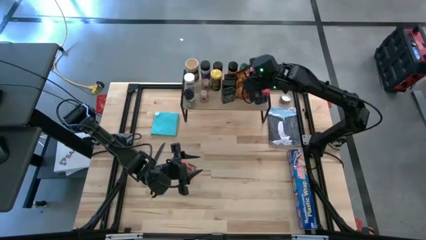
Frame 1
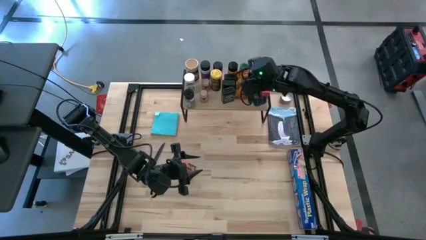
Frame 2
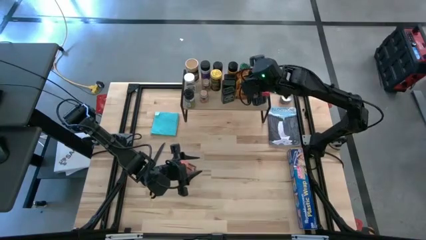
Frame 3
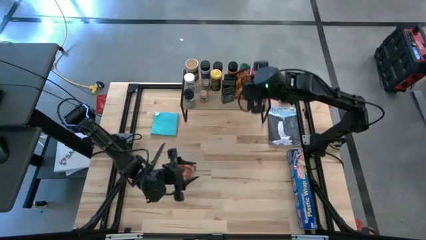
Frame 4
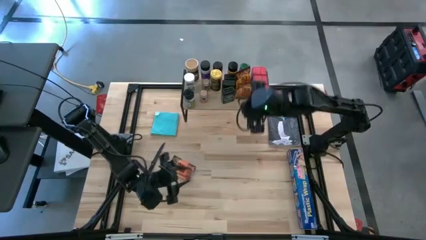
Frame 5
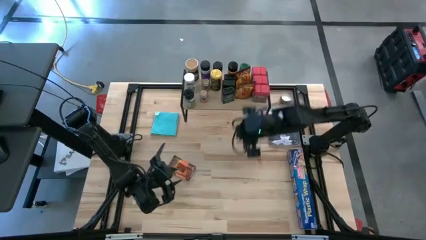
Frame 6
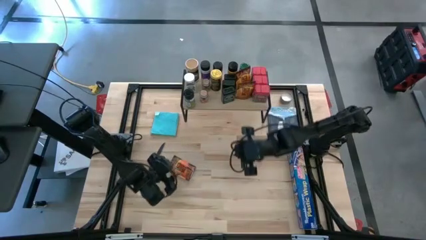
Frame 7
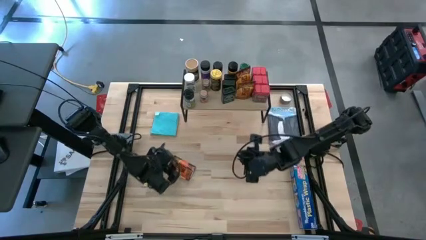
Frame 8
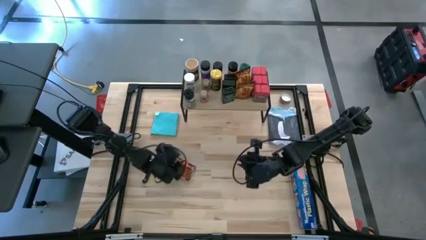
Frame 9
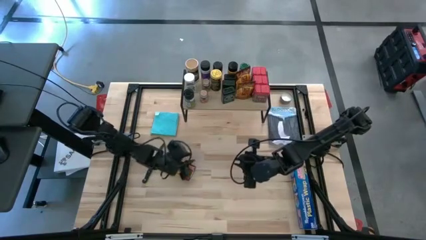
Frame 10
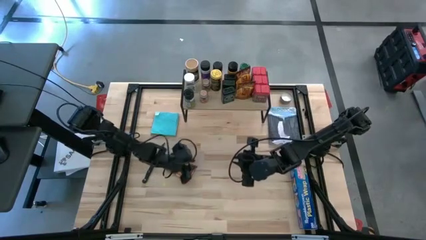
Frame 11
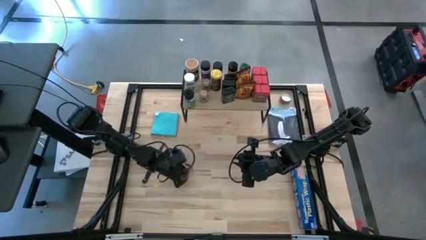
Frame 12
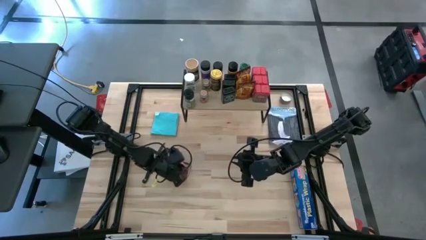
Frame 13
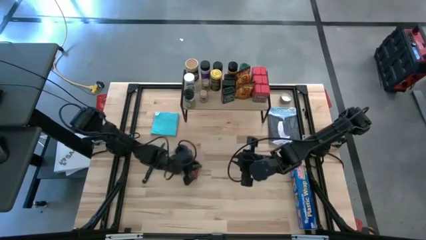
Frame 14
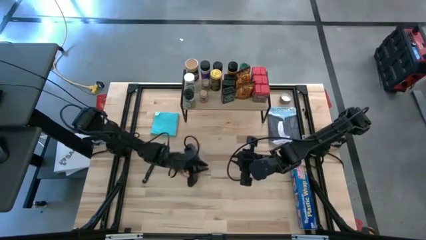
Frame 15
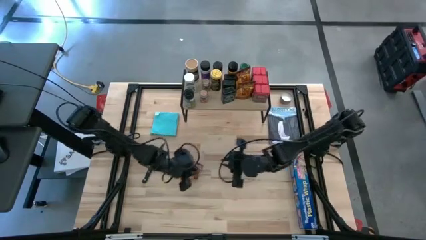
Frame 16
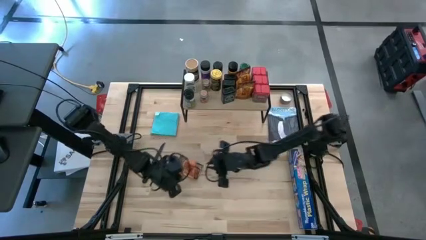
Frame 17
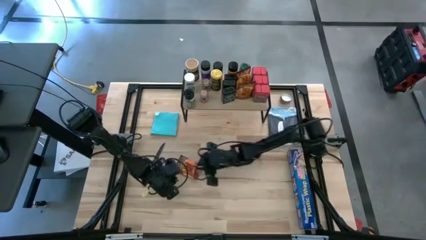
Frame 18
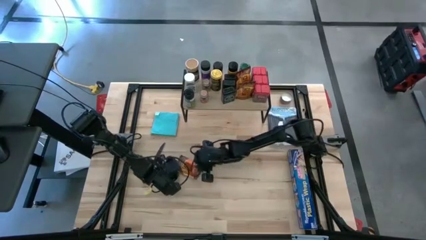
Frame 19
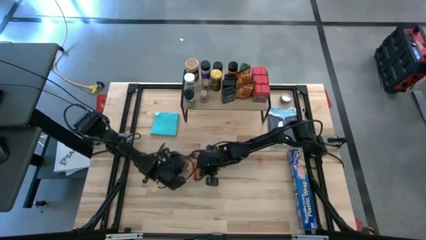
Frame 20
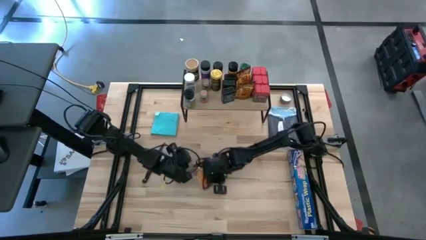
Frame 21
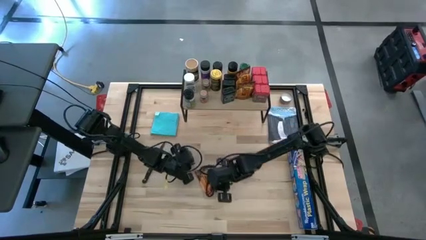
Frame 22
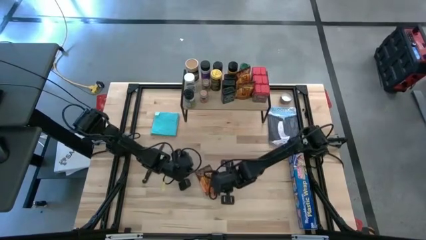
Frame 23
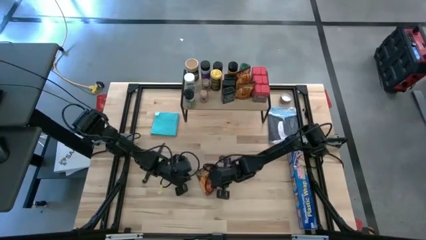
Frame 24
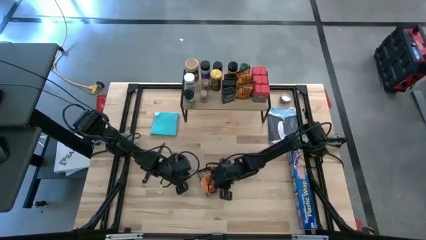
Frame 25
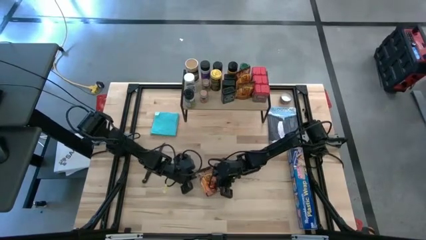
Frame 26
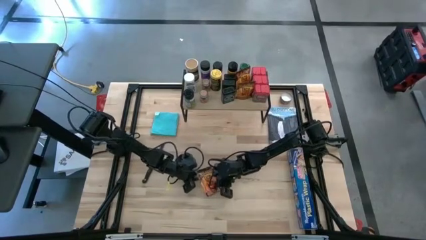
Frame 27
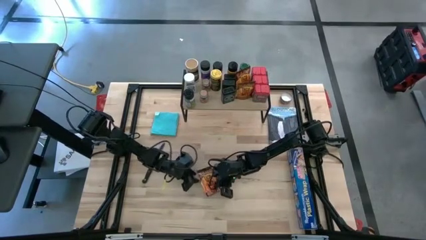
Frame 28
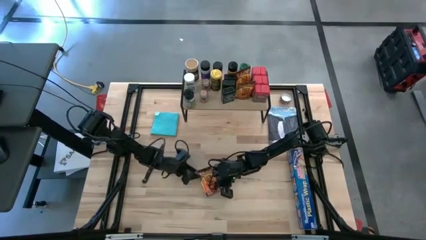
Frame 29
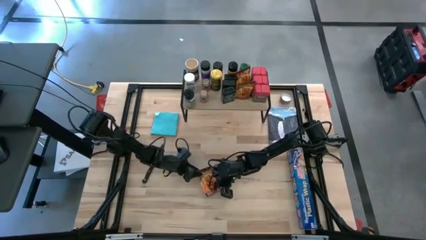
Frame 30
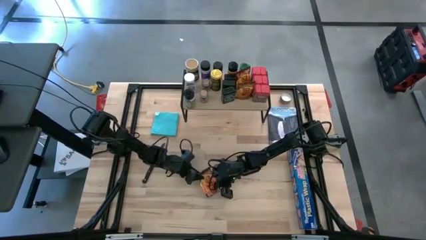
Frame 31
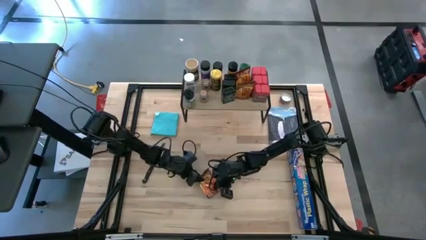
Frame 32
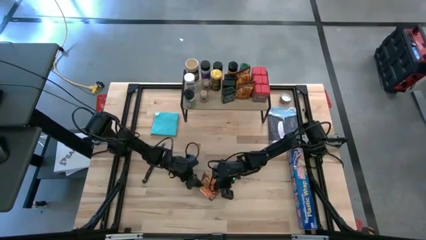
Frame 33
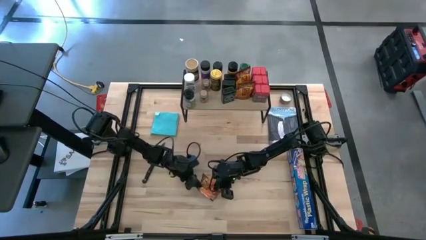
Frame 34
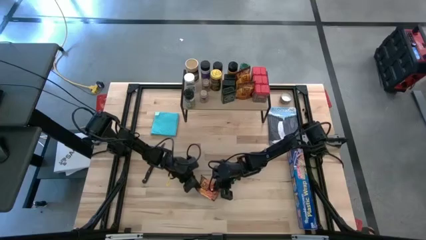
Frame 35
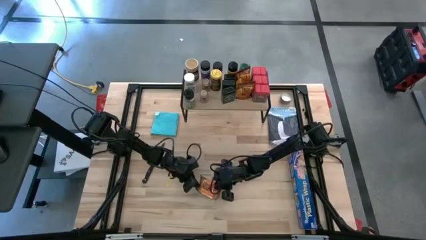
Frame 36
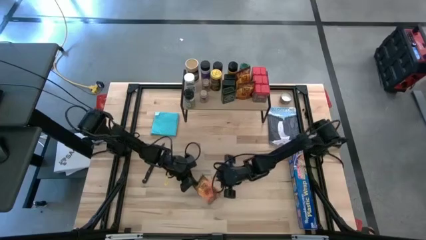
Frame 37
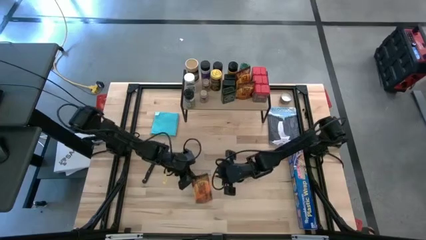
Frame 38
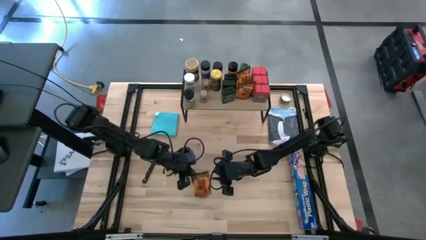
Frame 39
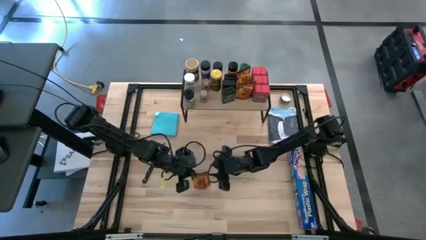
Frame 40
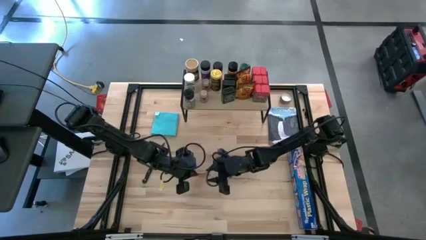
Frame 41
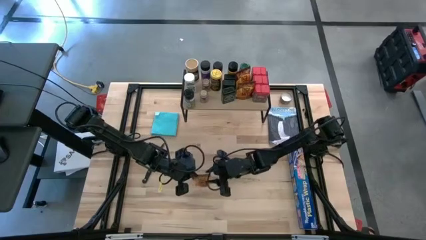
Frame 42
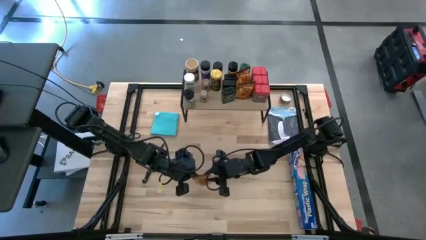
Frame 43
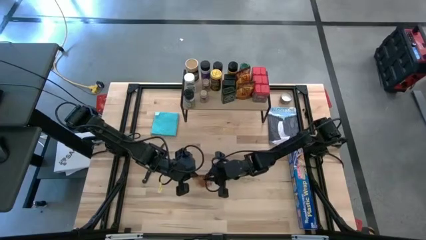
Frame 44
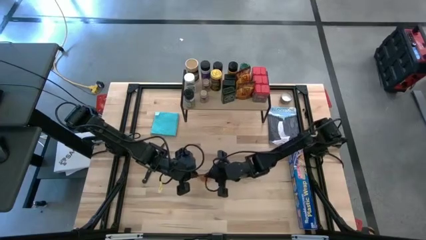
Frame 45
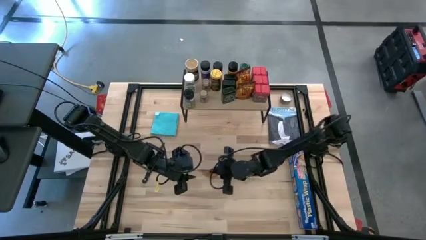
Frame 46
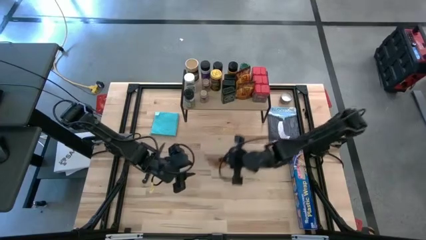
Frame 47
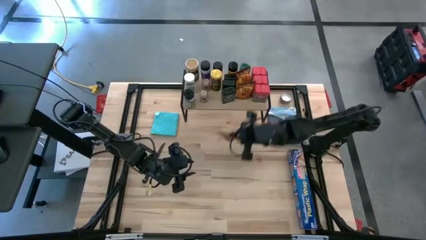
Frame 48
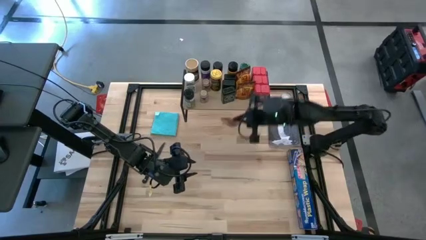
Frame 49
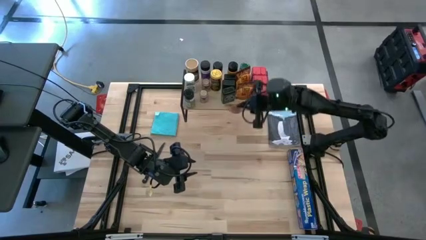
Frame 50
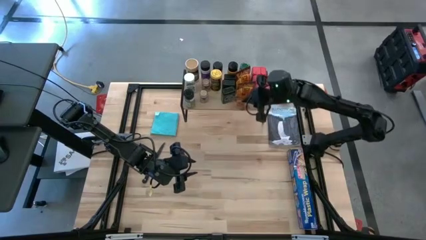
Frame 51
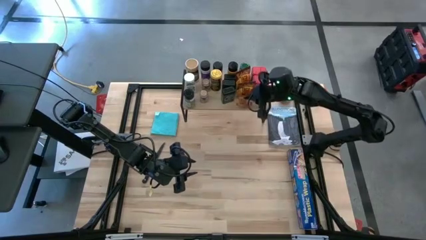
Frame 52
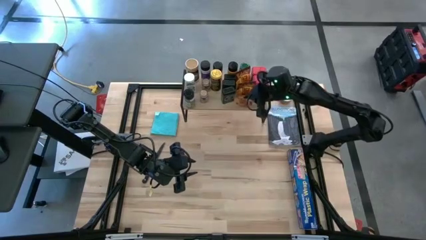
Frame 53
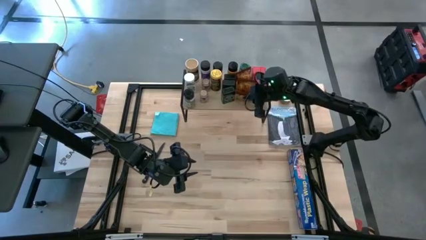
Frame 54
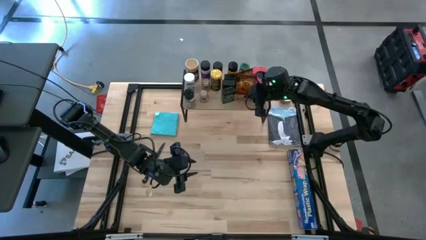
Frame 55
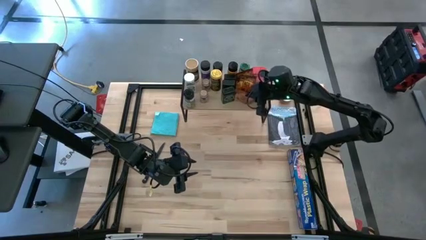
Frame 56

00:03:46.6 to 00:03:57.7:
Task: Shelf spices
Put the orange seasoning bag on the shelf aligned with the other orange seasoning bags

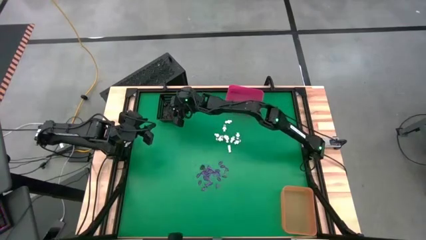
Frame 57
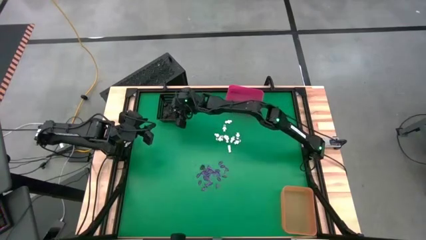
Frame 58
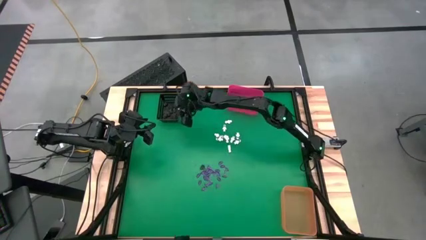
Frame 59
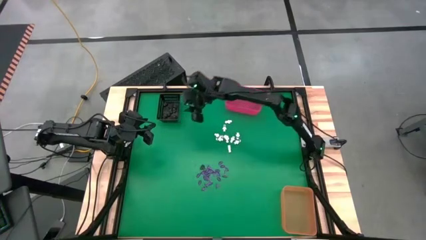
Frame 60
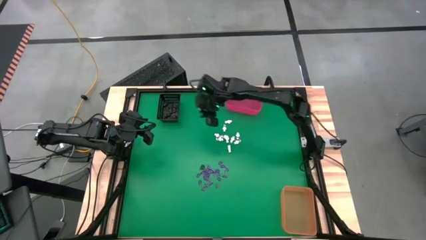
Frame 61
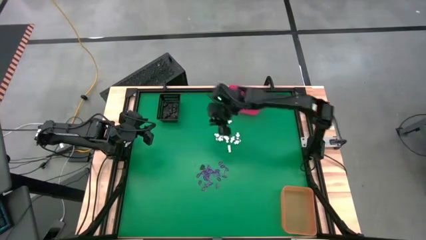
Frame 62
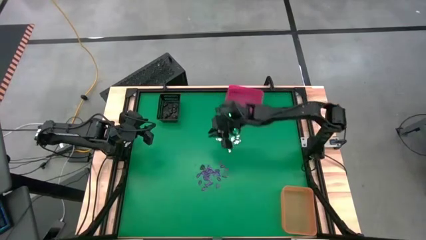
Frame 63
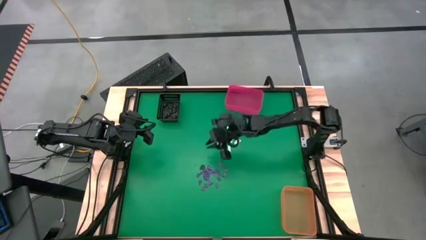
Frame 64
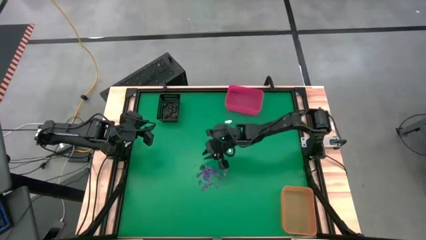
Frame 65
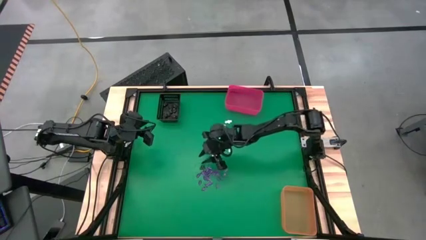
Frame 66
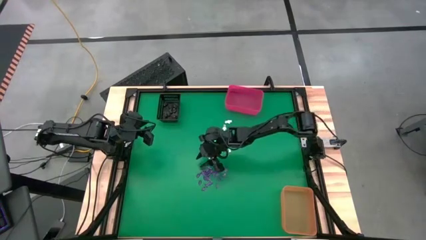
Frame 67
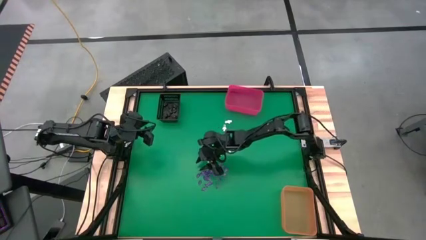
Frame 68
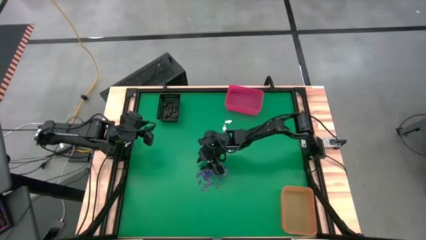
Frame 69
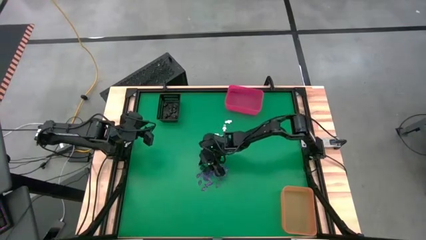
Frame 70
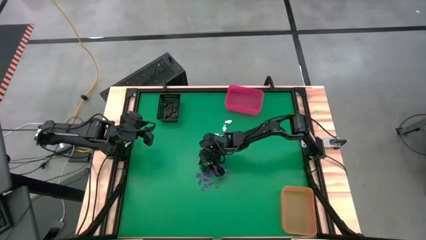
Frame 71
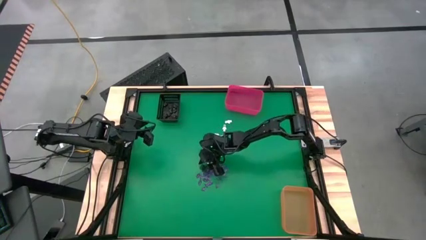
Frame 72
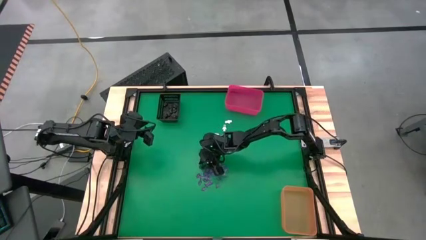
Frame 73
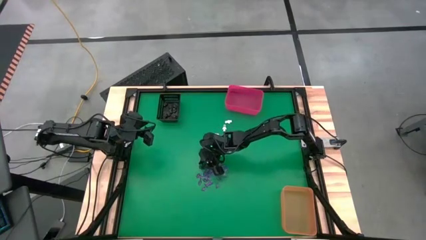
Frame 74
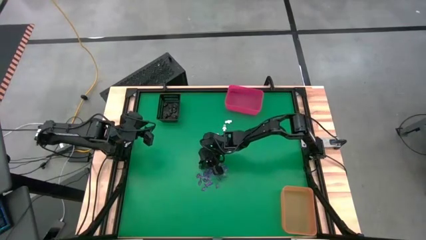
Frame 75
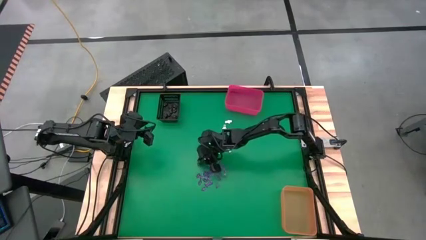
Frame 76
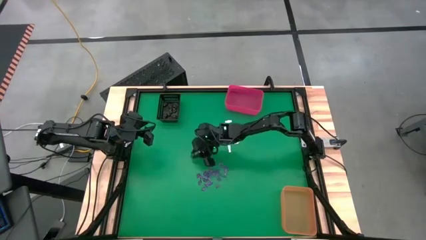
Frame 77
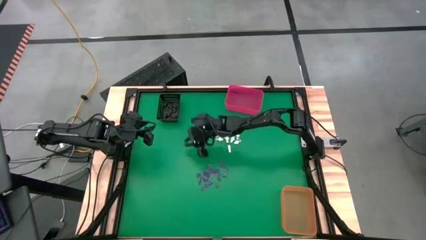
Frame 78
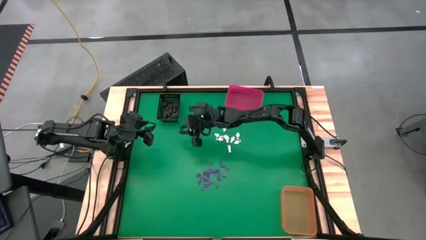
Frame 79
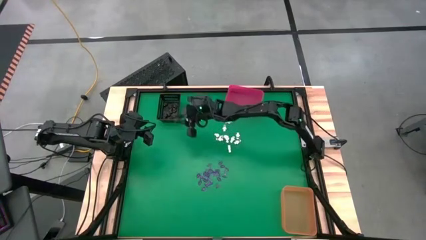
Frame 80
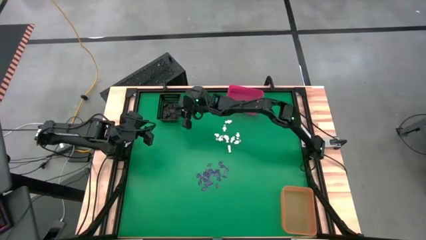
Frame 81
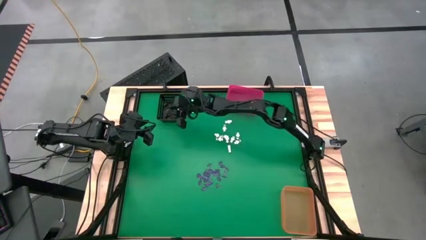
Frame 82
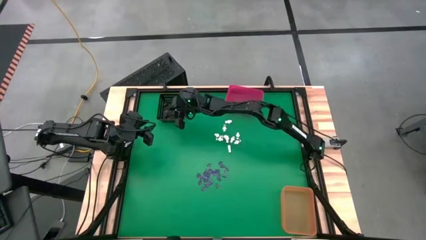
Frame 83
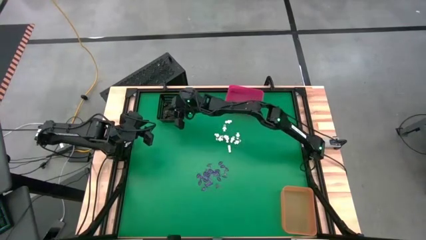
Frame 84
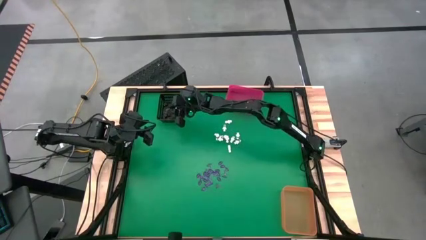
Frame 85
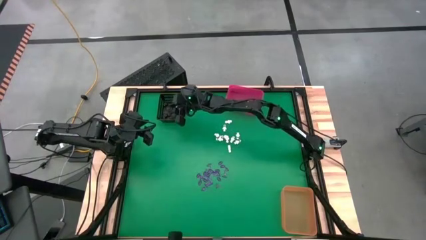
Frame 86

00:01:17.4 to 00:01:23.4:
Task: Sort Halloween decoration
Put the brown skull toy into the black bin
